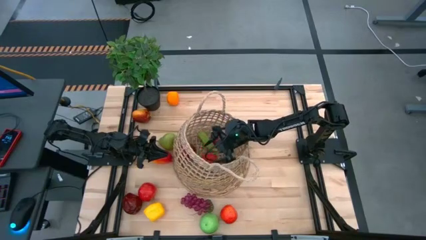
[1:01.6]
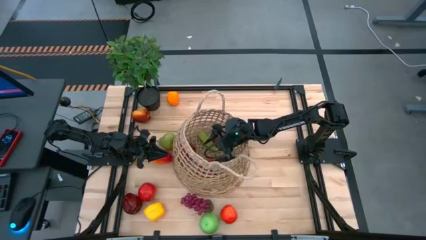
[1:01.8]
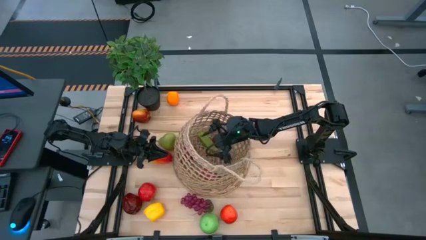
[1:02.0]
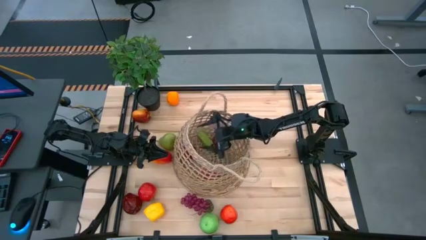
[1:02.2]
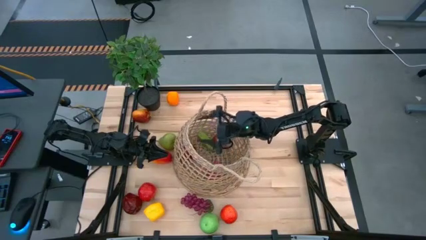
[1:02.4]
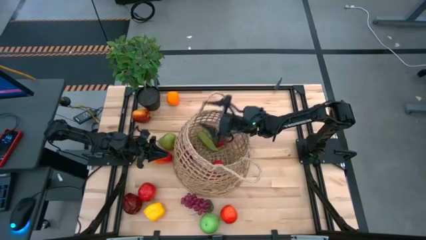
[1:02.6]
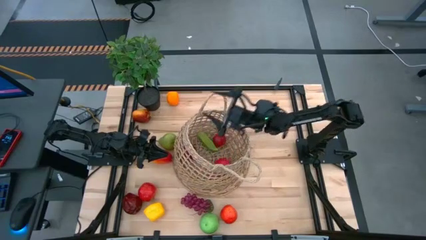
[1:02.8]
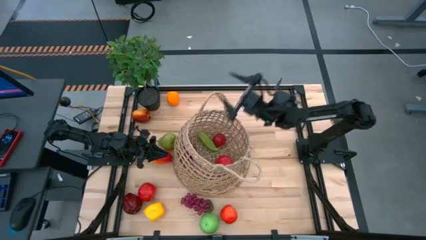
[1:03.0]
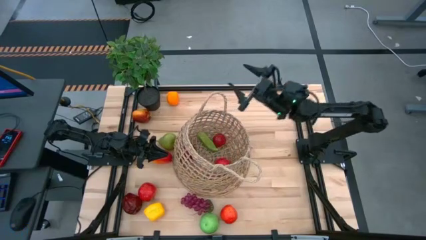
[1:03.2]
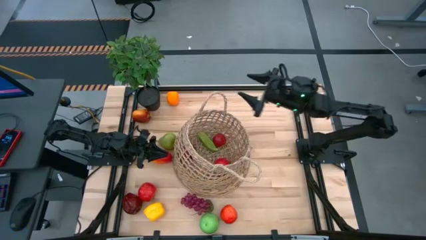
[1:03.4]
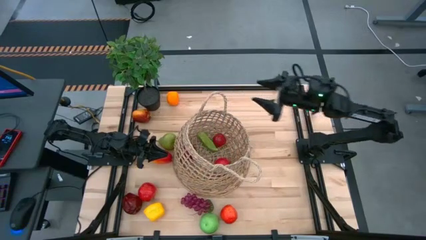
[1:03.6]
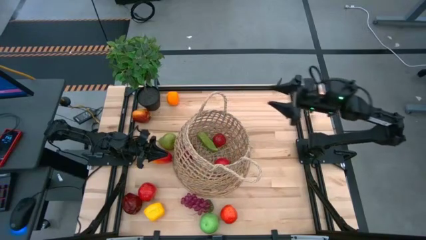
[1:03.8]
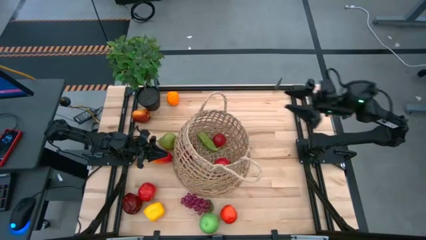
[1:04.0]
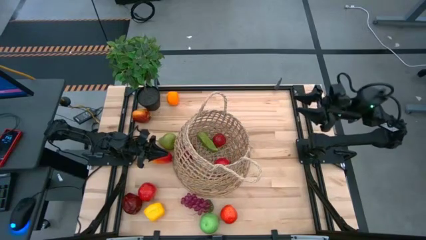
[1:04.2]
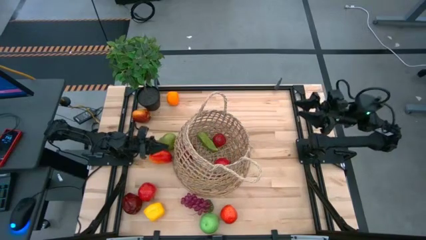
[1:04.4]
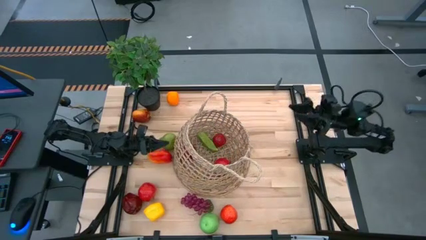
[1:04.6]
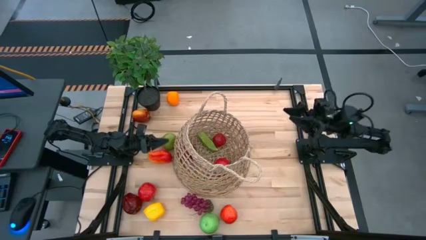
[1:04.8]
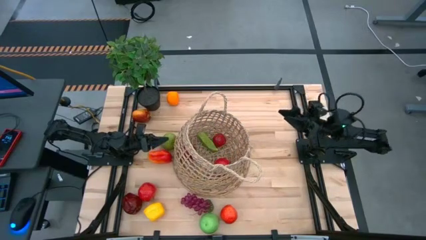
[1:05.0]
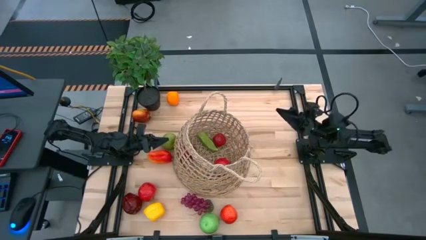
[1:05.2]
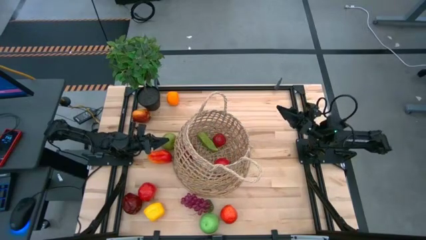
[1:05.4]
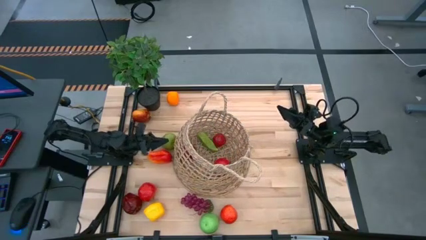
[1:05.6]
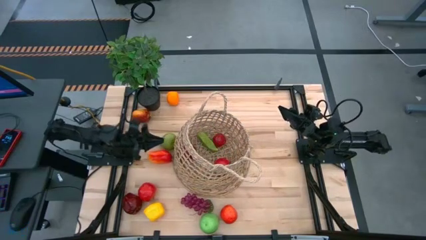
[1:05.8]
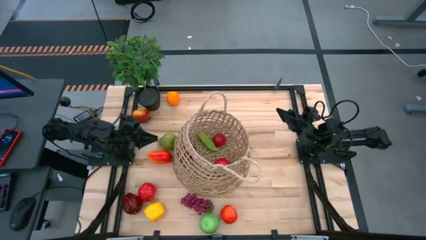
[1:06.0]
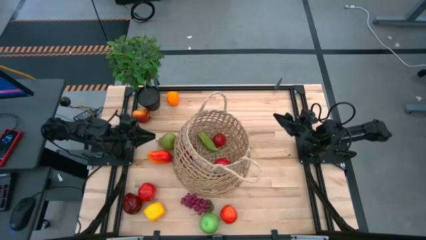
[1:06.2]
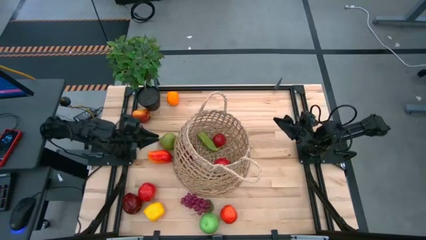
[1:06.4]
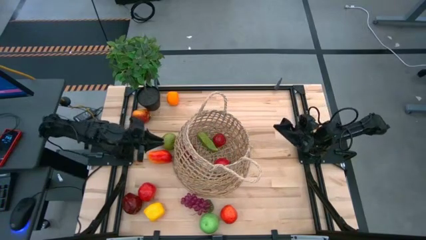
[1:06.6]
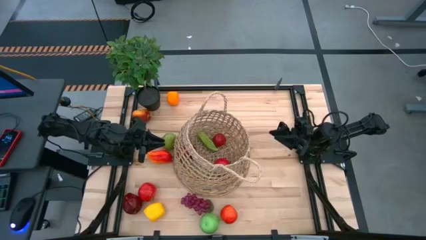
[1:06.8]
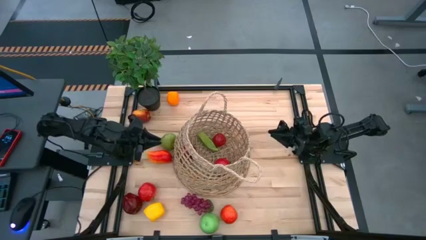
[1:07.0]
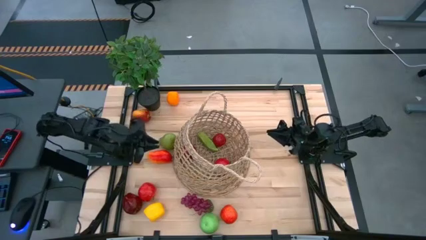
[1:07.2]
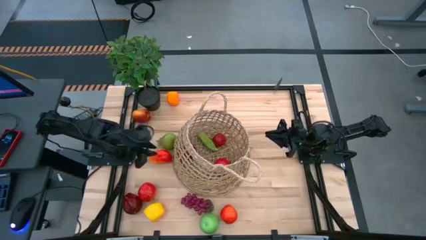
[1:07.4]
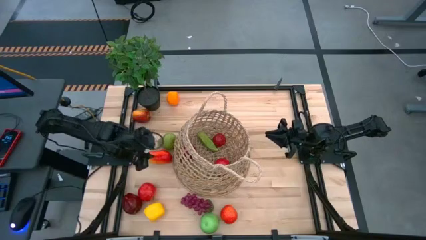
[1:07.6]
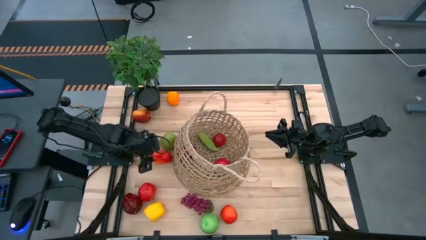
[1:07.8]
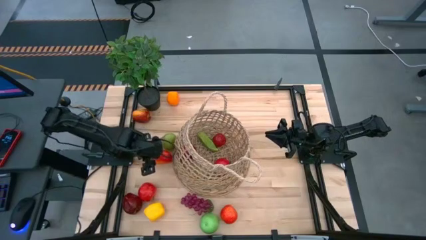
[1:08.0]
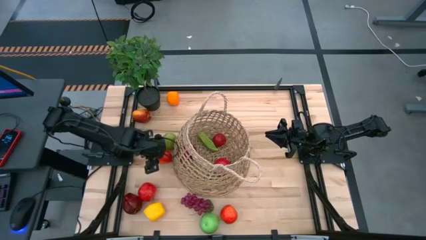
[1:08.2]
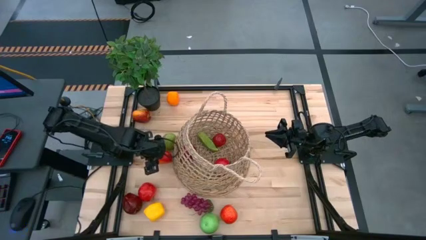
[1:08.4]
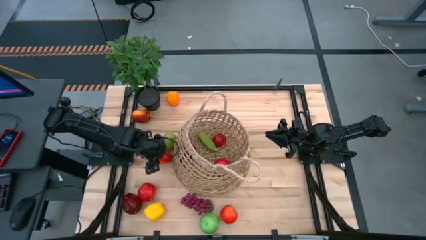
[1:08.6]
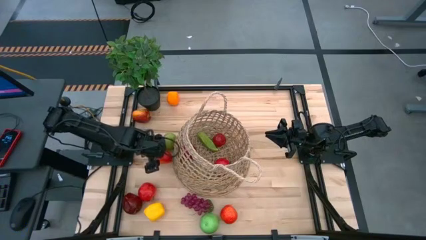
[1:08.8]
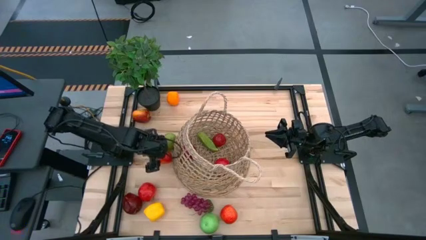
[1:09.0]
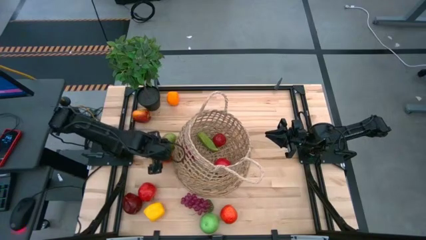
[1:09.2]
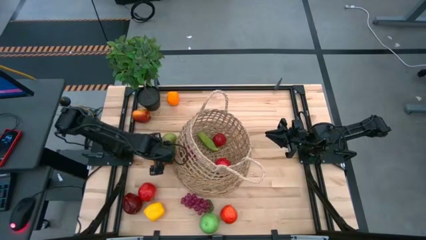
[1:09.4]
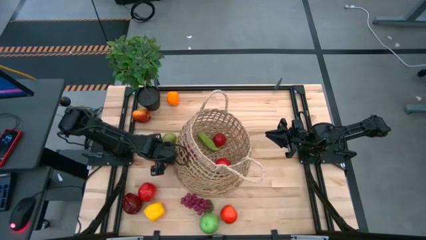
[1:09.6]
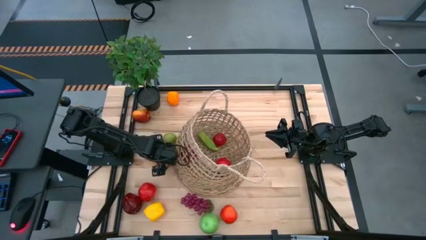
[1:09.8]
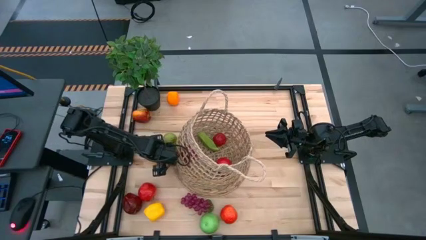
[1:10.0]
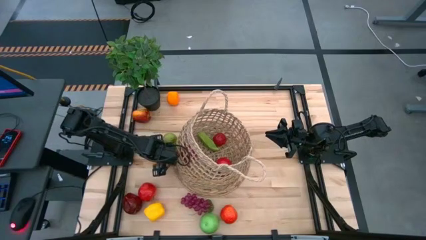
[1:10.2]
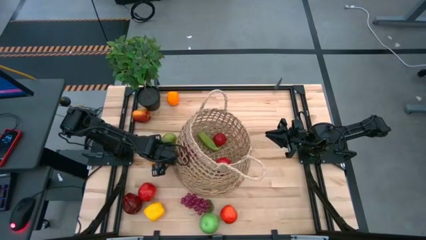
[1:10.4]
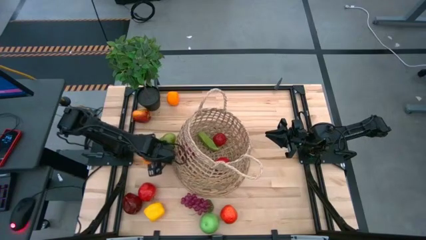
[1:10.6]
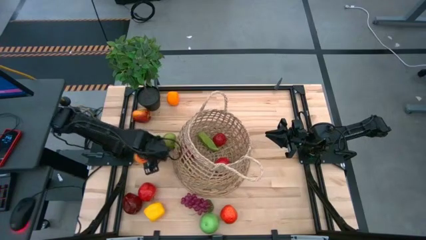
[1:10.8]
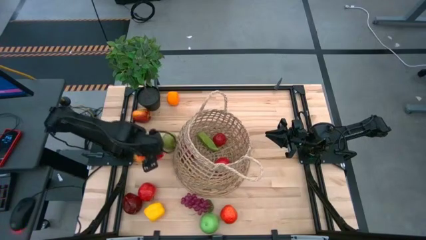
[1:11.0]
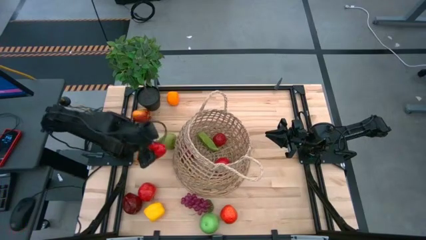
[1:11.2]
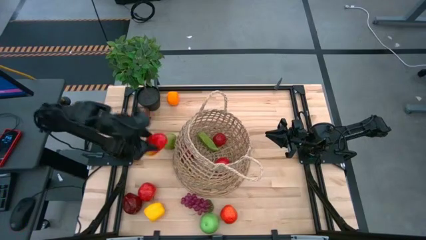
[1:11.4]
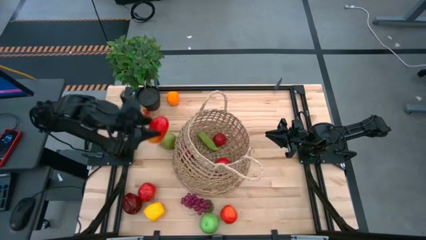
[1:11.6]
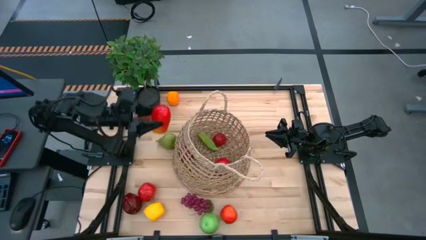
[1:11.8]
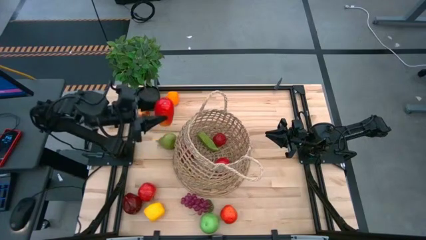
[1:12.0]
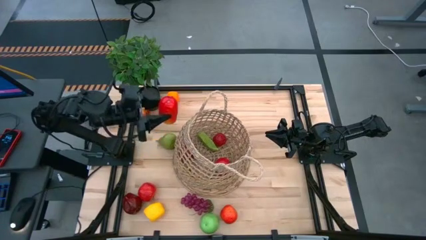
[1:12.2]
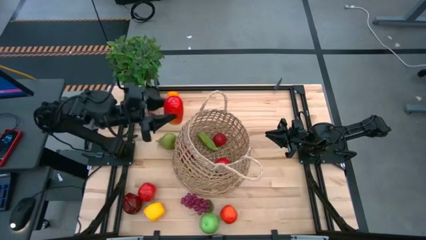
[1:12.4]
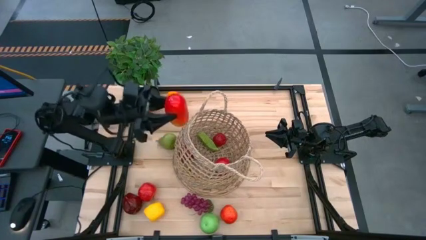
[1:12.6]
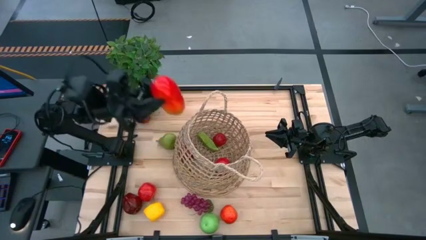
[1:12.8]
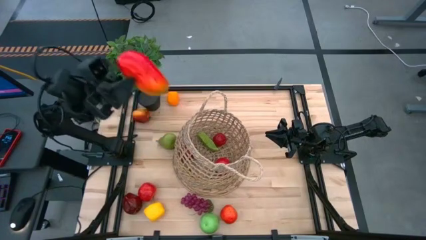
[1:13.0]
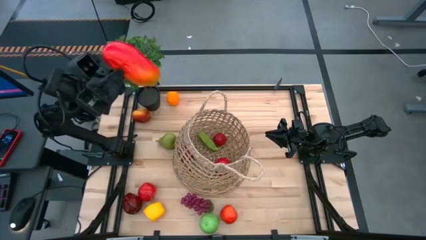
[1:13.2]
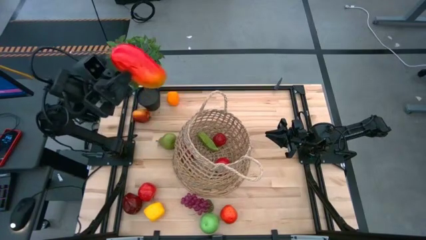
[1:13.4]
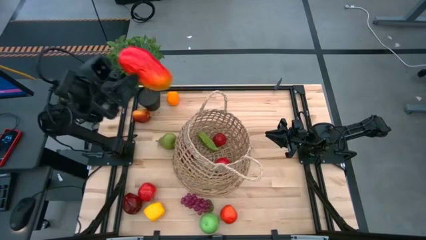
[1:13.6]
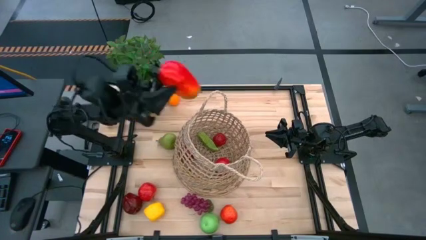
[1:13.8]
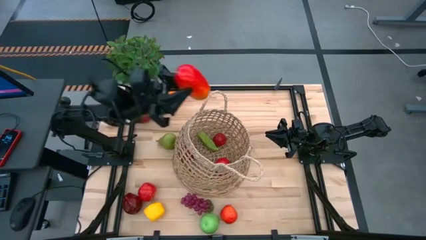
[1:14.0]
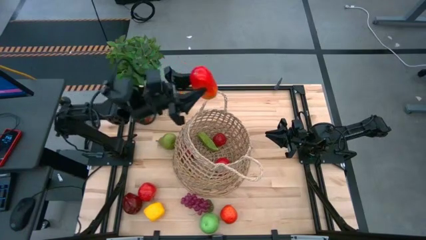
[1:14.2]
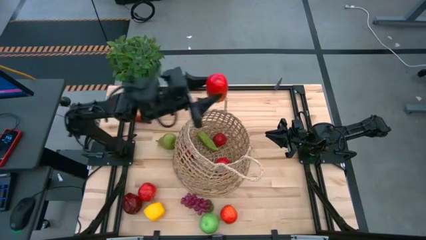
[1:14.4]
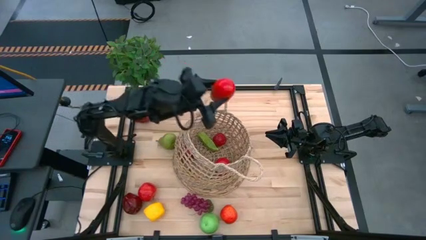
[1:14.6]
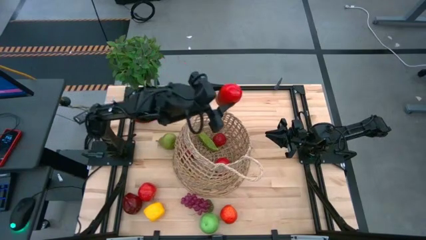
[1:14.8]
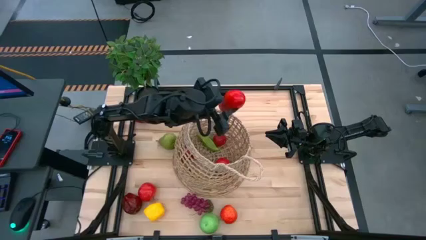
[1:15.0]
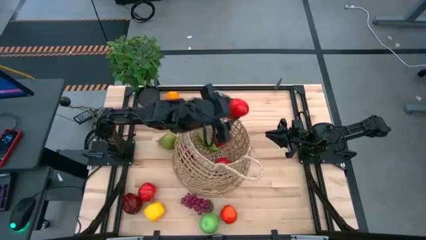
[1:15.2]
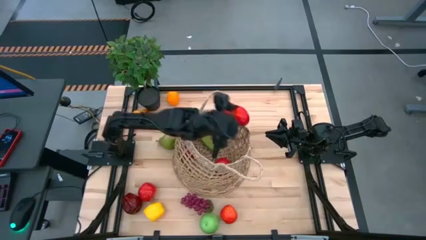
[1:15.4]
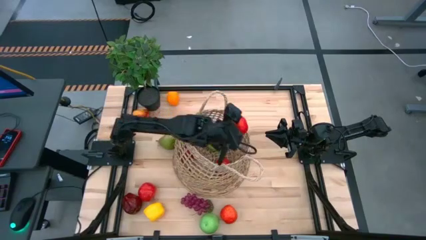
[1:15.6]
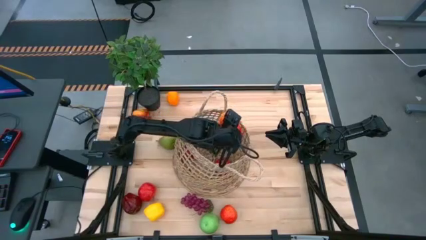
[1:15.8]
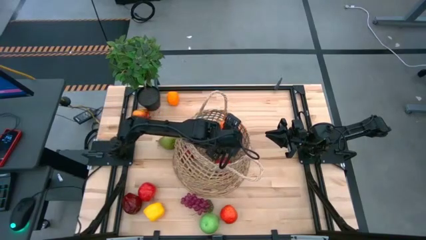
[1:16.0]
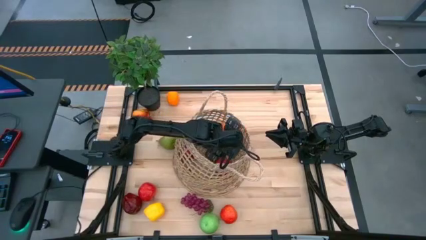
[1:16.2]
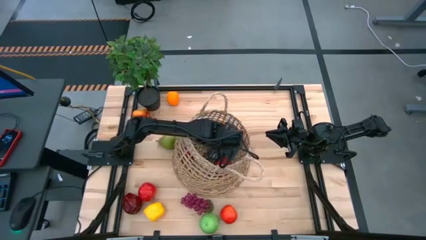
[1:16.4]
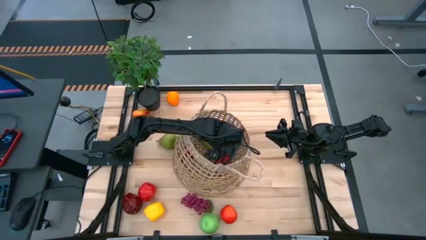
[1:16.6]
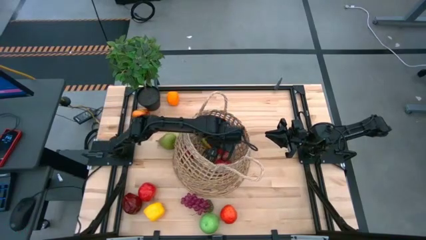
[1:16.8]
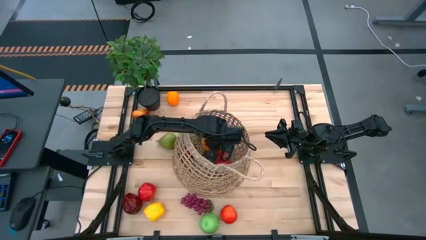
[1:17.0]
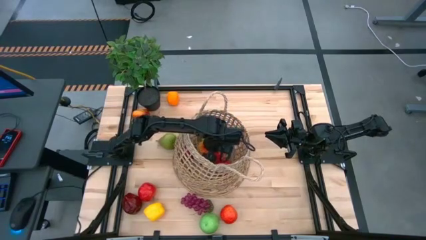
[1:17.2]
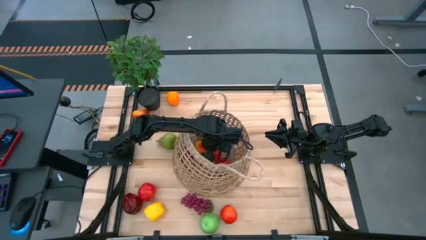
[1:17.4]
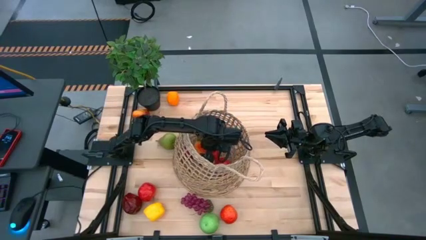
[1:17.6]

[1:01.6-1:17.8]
Task: Build produce basket
Put the mango into the basket
